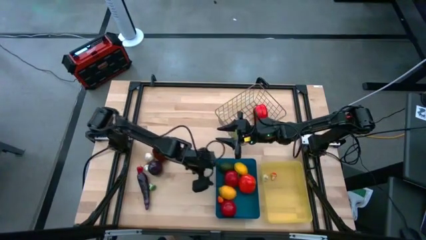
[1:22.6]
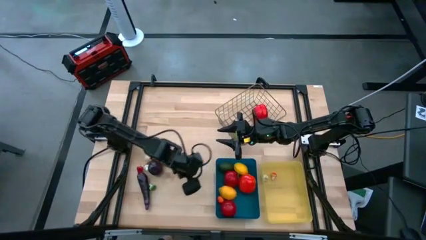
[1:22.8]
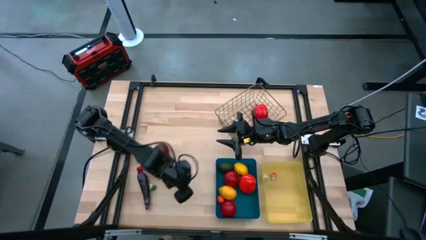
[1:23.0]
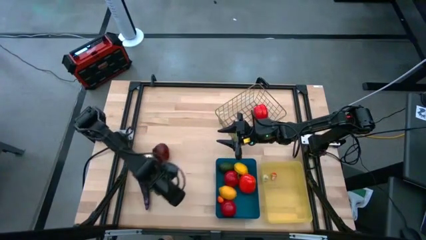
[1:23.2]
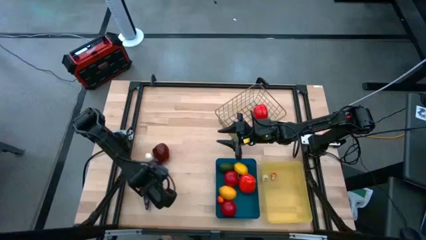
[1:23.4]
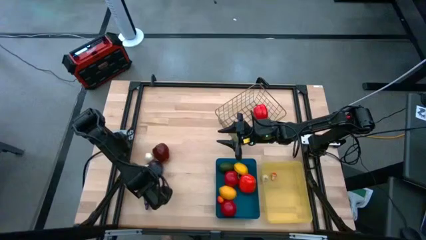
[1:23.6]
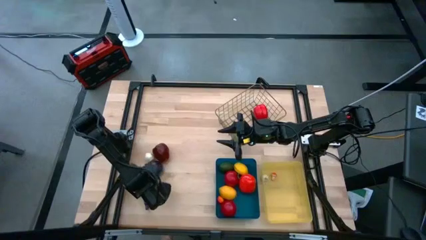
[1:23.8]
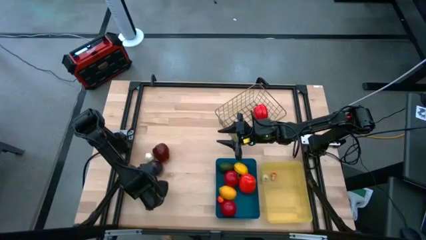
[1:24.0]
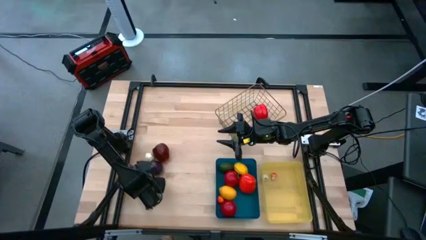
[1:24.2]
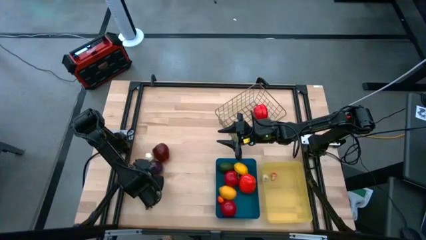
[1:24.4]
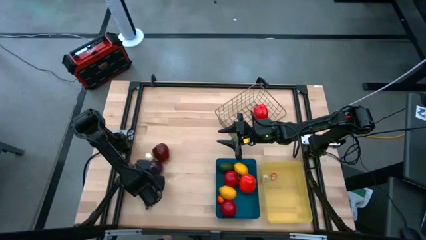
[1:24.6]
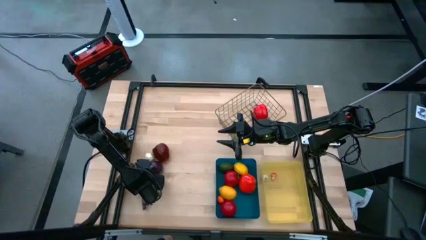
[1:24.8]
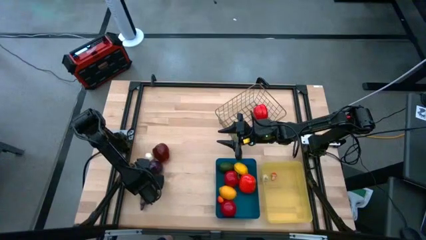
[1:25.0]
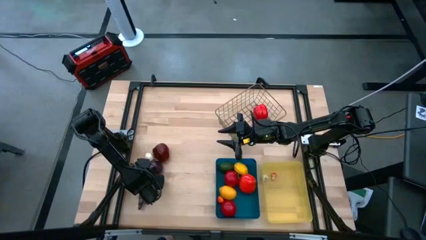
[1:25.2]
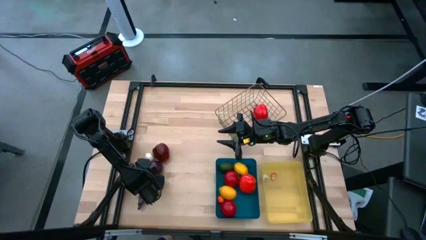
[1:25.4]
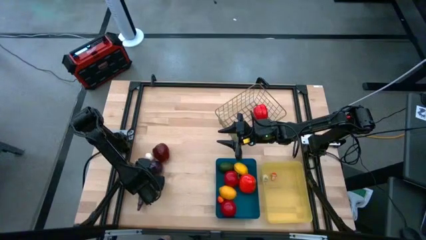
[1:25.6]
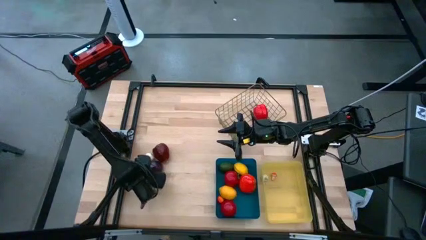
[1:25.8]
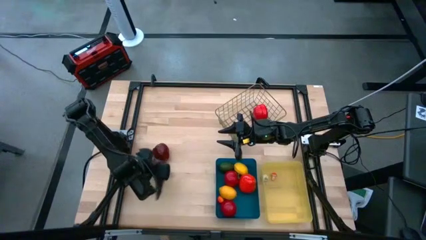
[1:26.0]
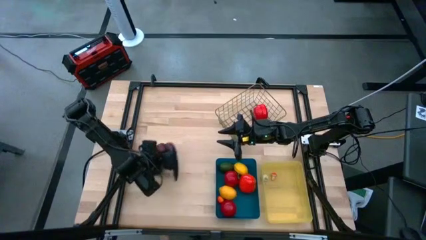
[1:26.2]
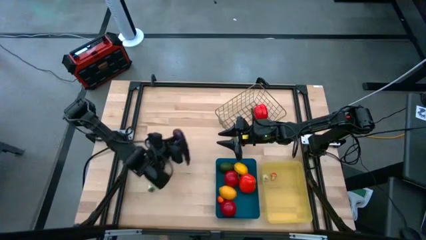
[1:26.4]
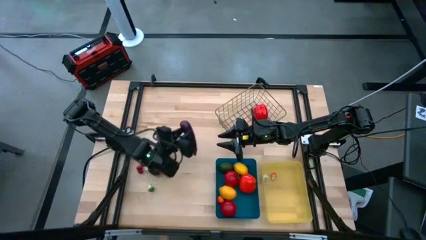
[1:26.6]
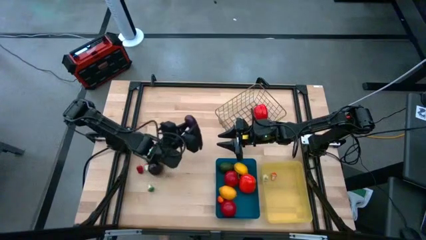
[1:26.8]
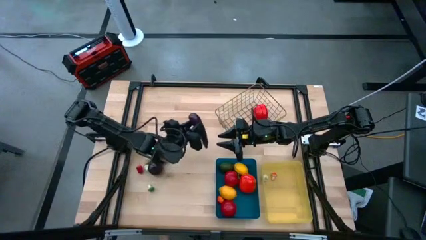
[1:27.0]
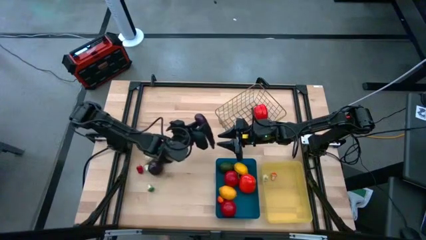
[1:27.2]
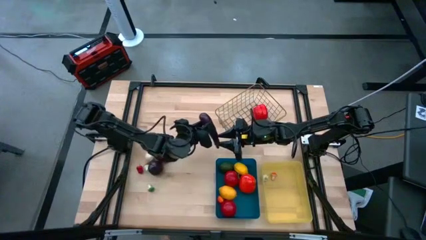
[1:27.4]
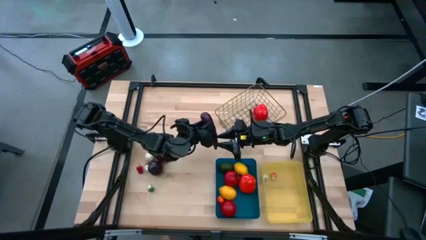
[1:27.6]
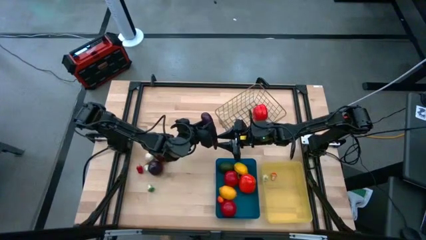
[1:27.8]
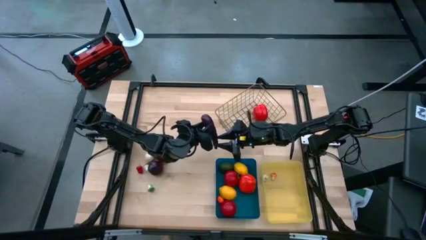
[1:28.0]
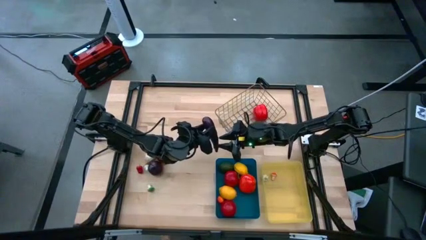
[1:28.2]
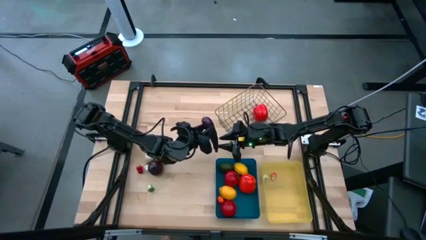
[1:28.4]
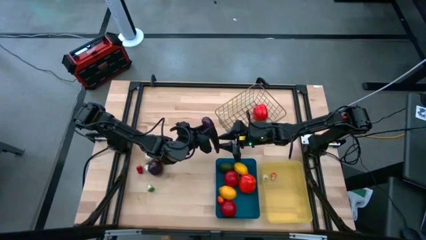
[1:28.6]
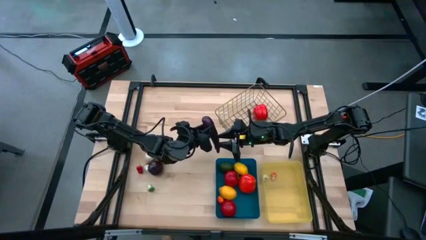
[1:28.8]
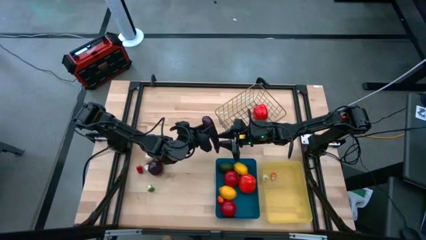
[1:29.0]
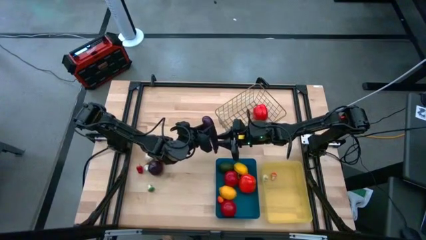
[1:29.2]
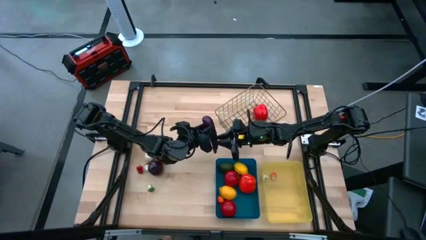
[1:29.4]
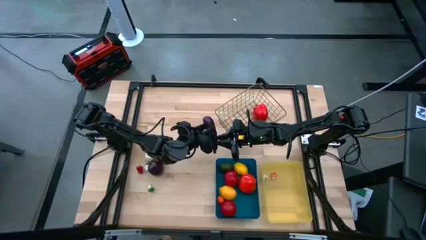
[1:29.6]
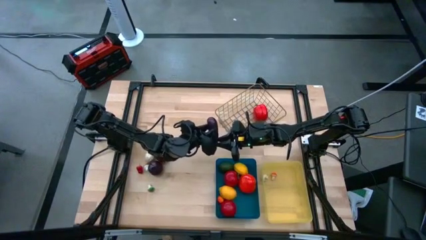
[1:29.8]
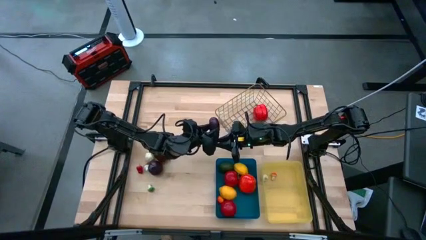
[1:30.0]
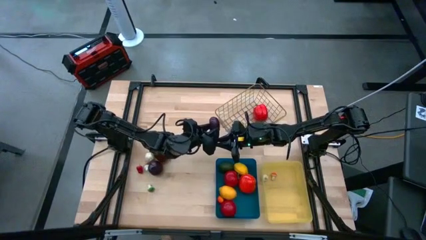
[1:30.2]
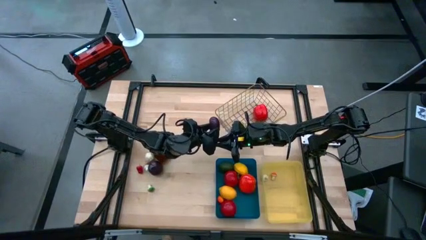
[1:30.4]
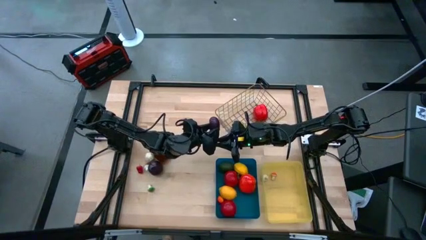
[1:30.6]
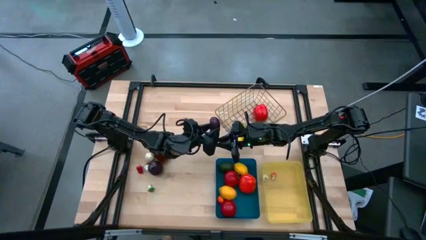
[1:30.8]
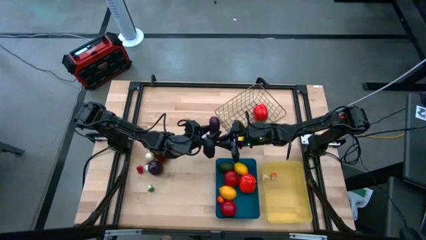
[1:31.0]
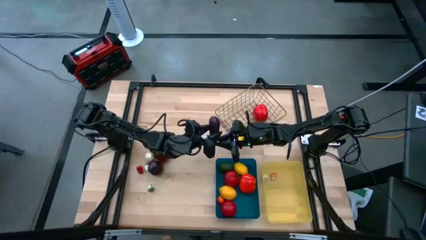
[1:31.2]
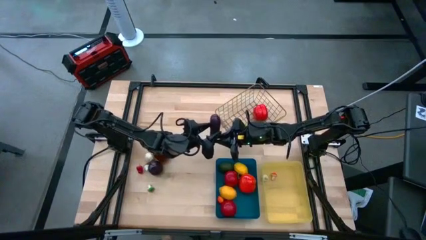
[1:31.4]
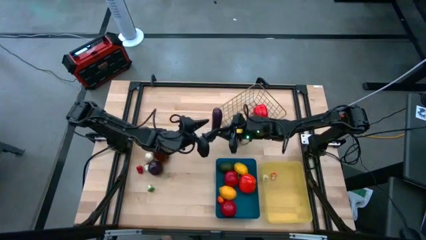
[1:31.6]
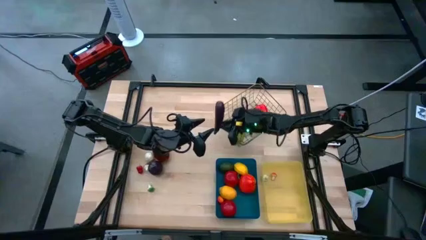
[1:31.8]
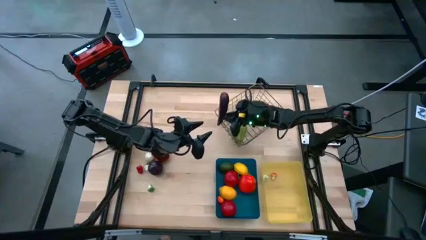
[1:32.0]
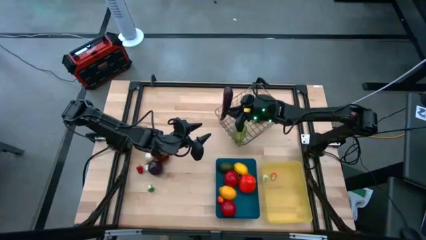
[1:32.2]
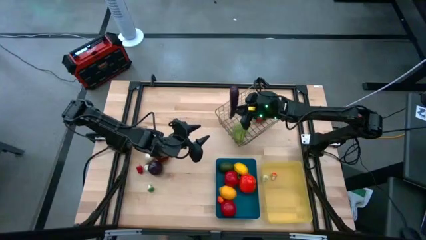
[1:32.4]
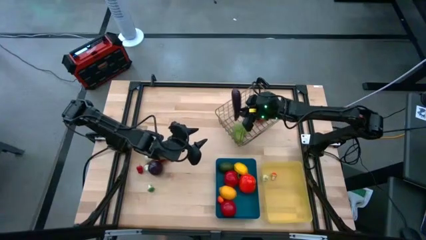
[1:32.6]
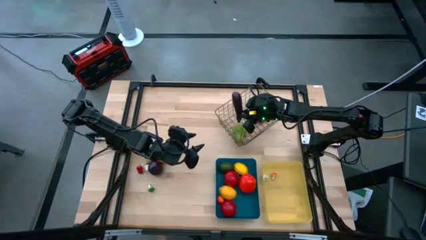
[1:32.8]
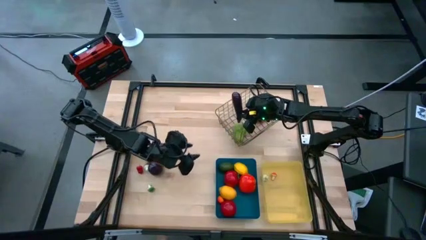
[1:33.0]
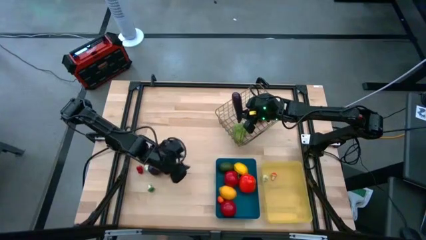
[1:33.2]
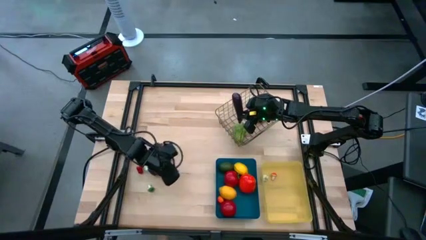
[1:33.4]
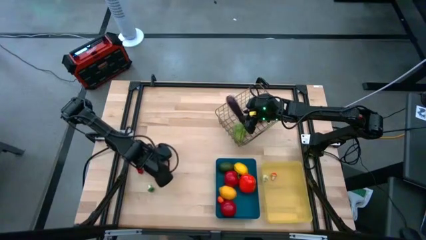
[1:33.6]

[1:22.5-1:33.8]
Task: Sort produce into baskets
Put the purple eggplant into the brown wire basket

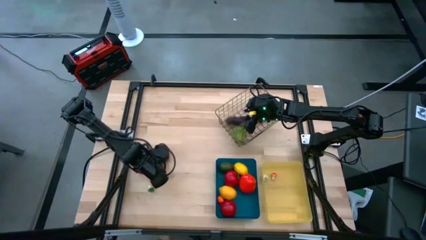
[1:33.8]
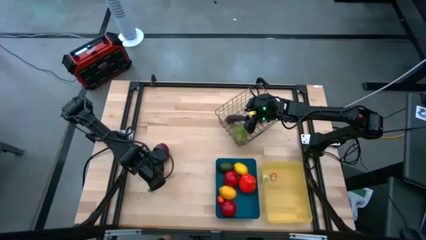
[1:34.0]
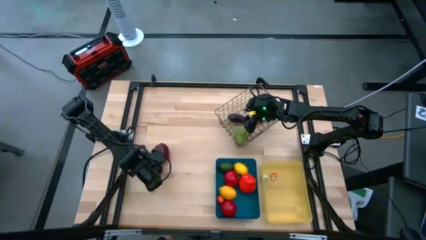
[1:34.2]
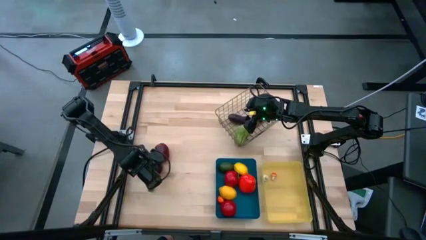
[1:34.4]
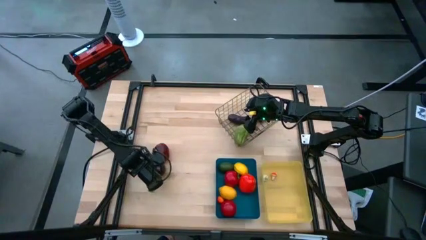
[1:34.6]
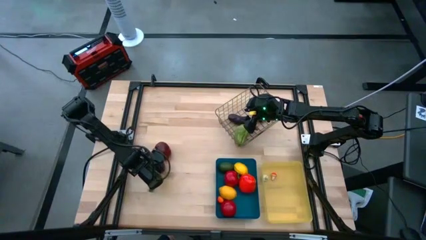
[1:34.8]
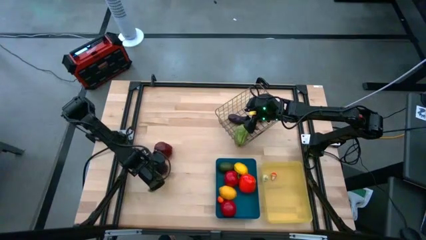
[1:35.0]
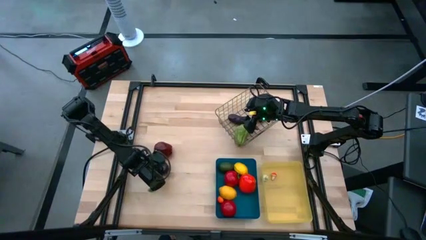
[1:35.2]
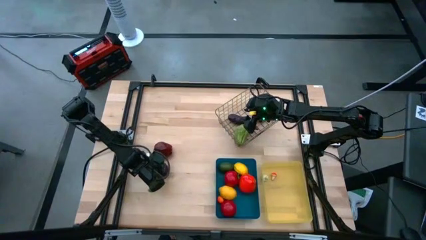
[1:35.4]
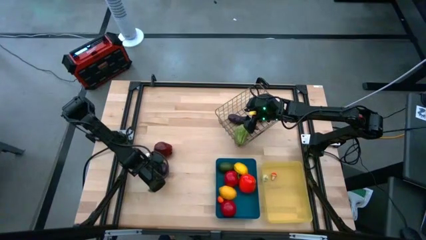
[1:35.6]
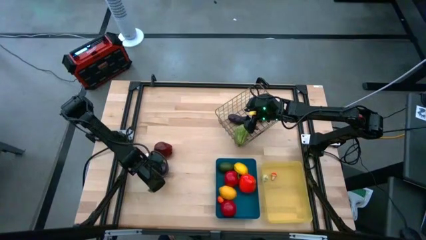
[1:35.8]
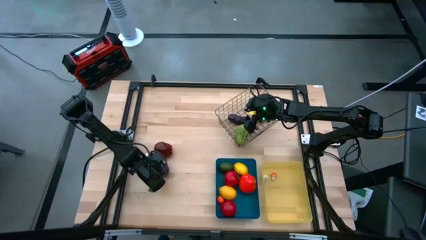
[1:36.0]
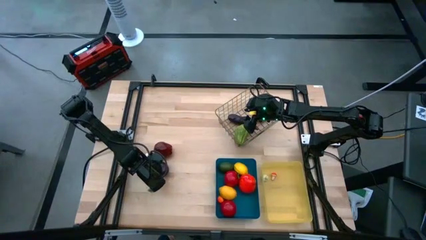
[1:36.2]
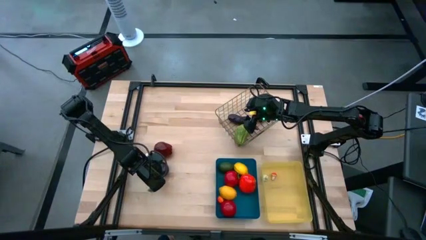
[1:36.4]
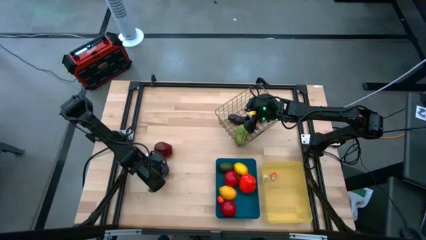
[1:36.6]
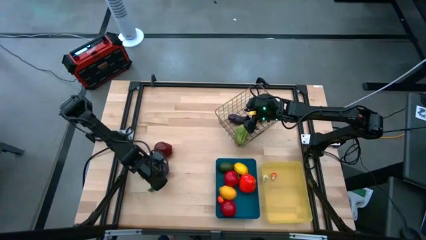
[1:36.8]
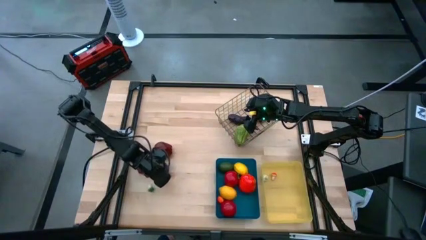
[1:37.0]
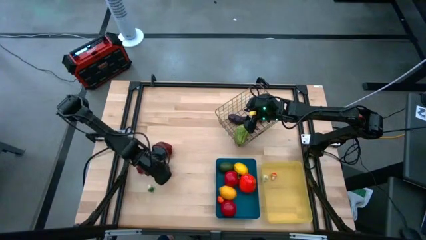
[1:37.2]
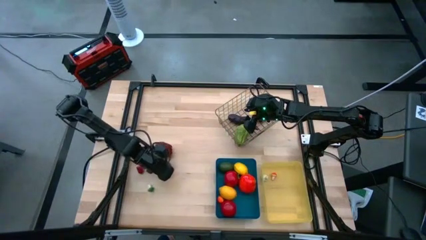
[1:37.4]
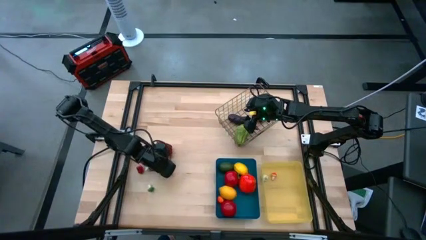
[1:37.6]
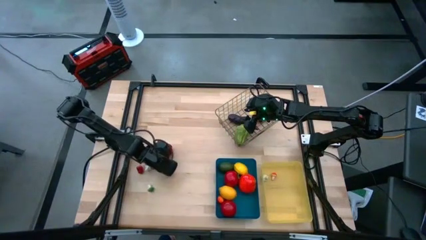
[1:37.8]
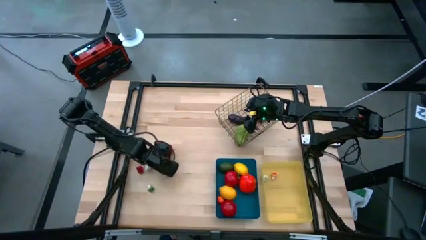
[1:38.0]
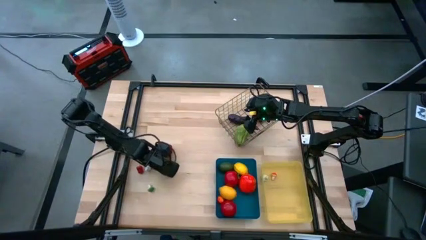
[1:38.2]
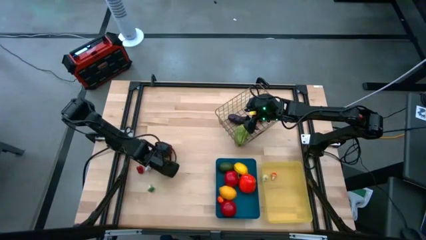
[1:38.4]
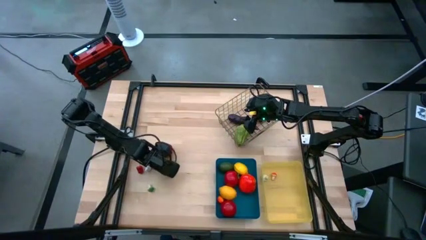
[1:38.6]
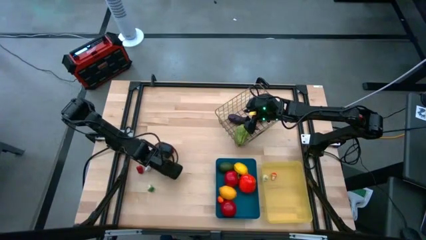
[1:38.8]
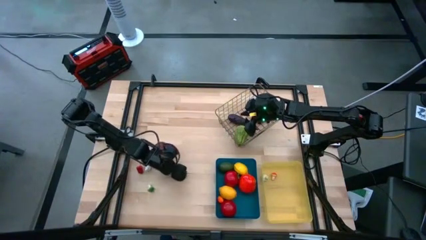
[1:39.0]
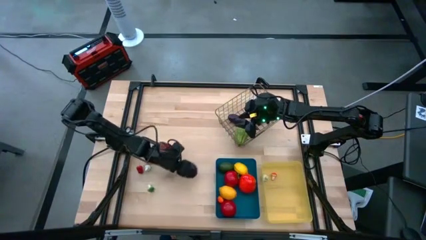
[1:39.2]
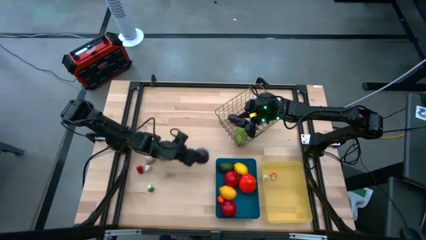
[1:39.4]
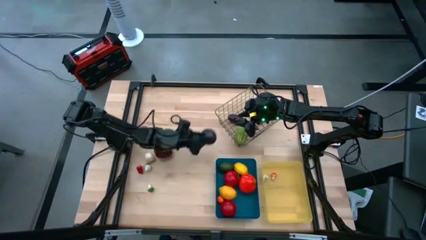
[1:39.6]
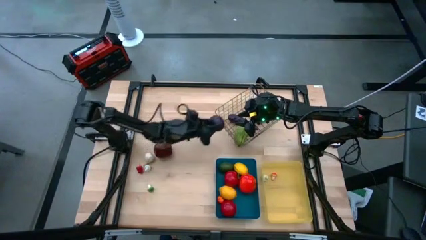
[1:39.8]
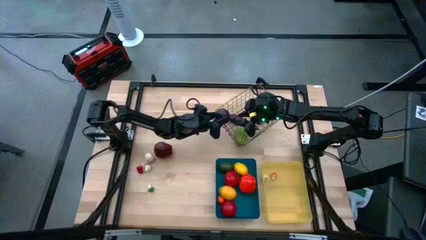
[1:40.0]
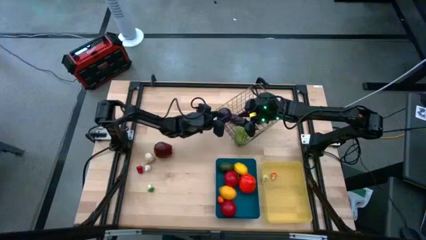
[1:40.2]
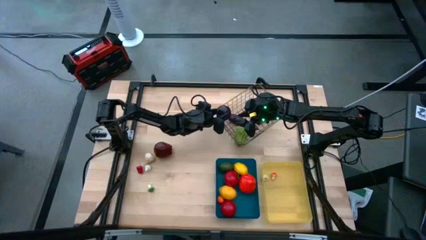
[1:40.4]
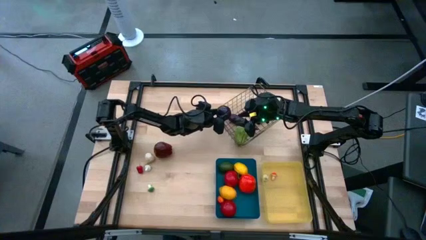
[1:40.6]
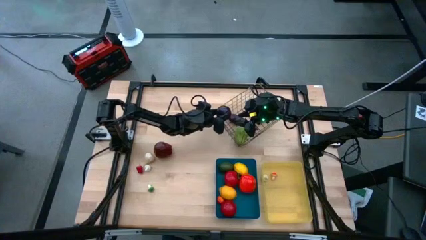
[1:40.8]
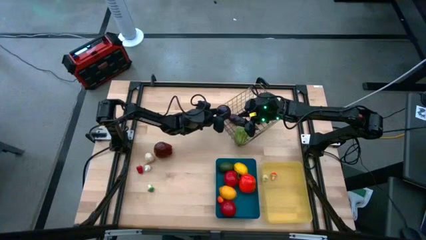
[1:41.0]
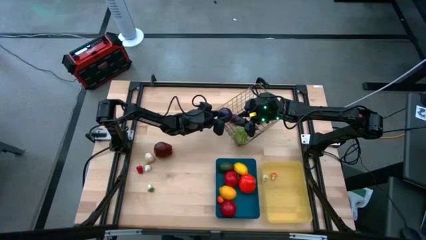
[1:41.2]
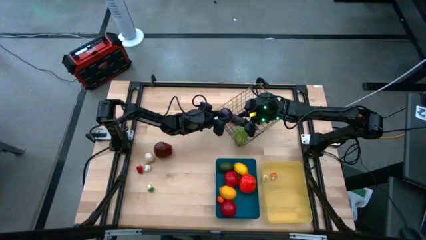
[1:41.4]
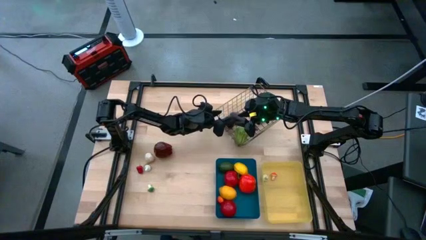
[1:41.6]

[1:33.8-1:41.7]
Put the purple onion into the brown wire basket
